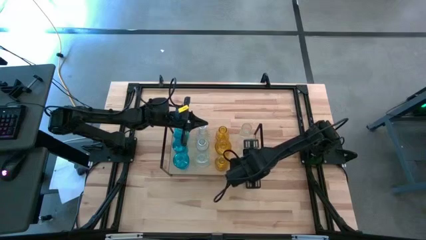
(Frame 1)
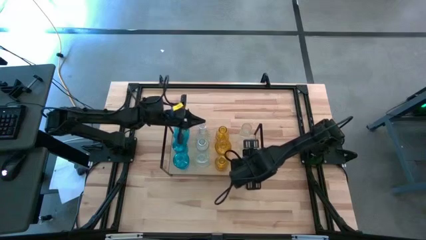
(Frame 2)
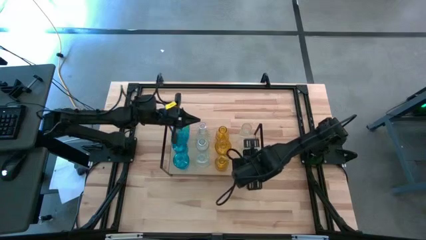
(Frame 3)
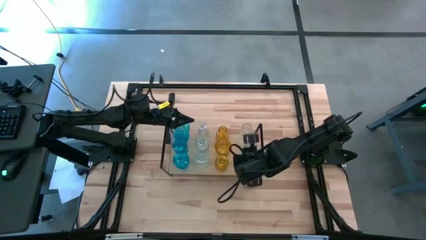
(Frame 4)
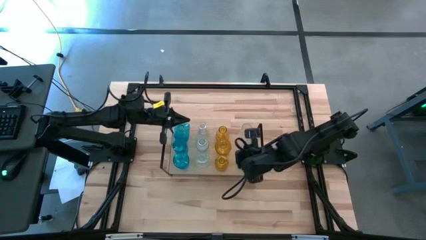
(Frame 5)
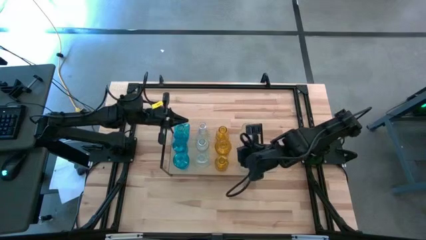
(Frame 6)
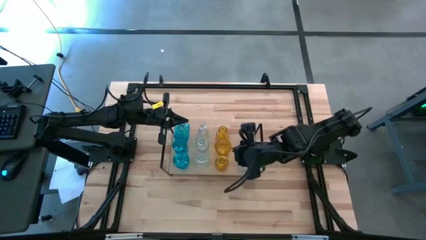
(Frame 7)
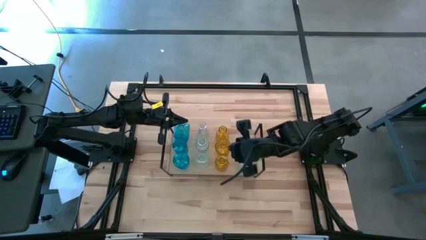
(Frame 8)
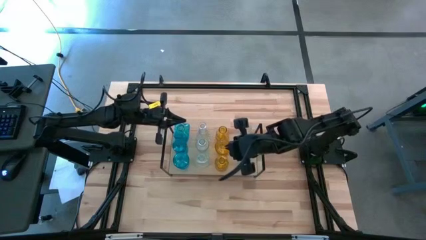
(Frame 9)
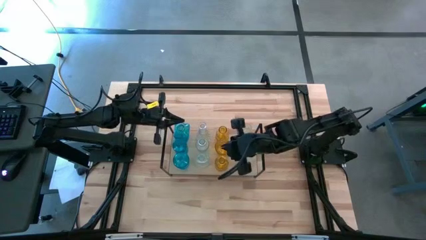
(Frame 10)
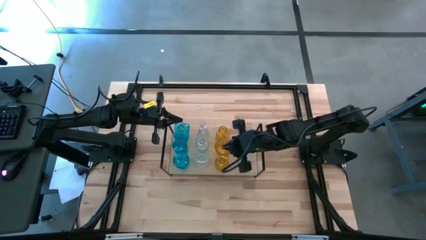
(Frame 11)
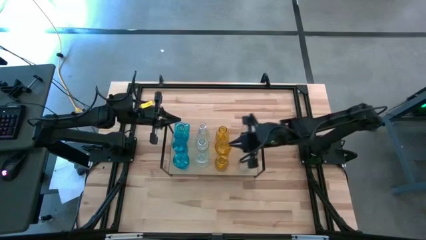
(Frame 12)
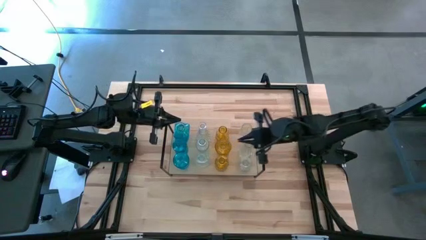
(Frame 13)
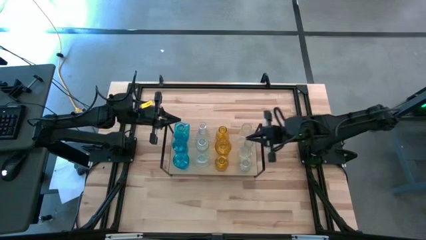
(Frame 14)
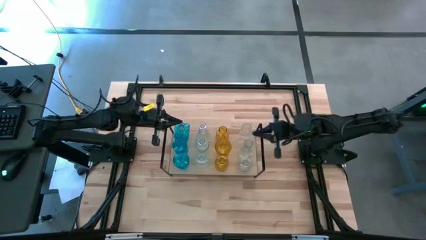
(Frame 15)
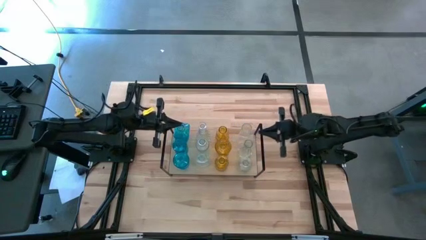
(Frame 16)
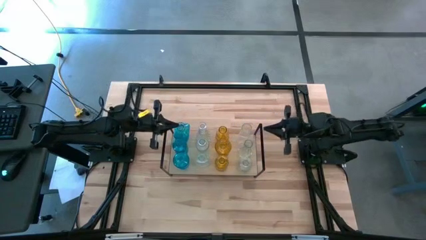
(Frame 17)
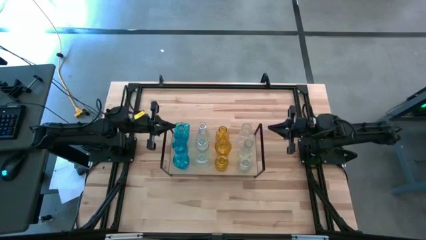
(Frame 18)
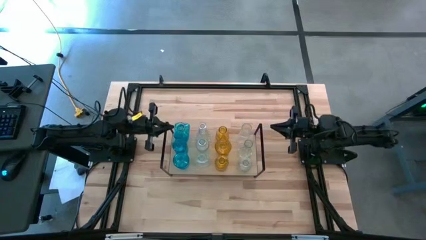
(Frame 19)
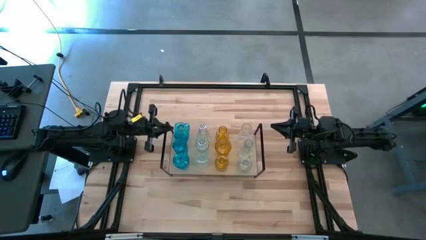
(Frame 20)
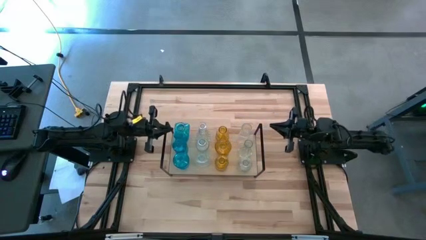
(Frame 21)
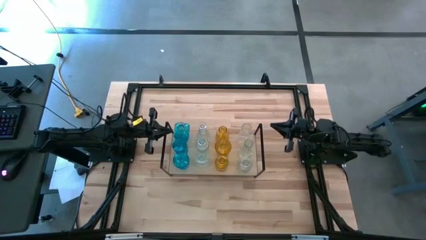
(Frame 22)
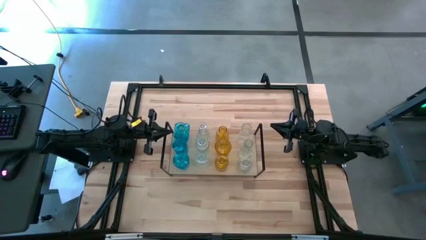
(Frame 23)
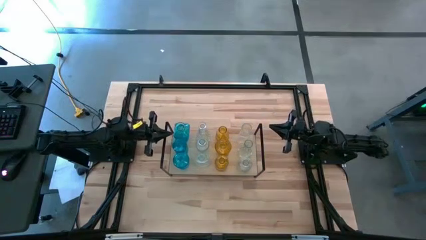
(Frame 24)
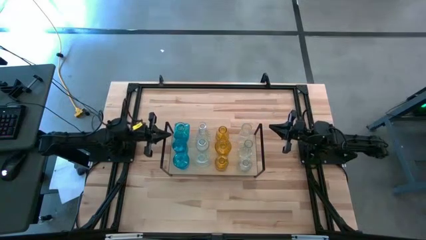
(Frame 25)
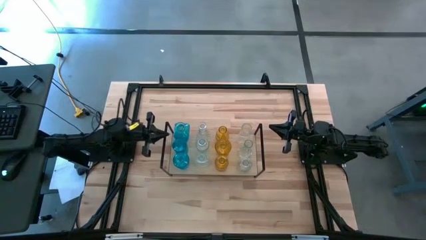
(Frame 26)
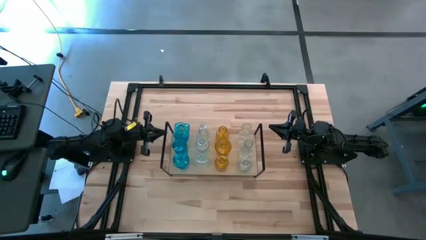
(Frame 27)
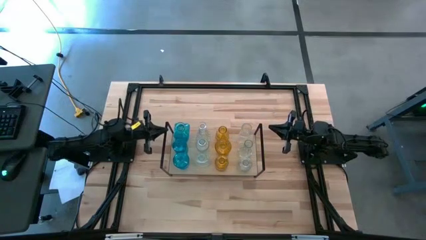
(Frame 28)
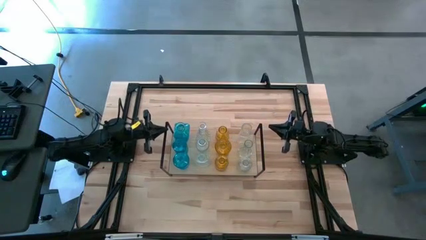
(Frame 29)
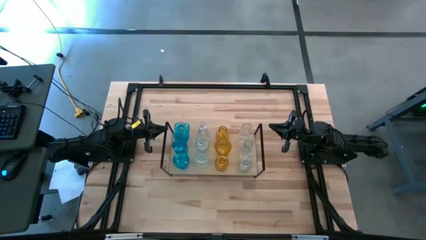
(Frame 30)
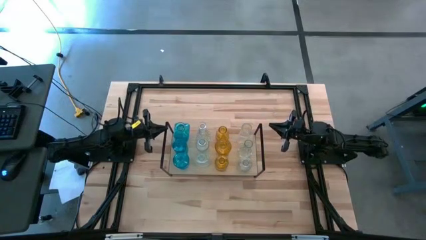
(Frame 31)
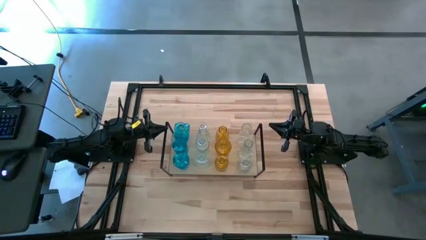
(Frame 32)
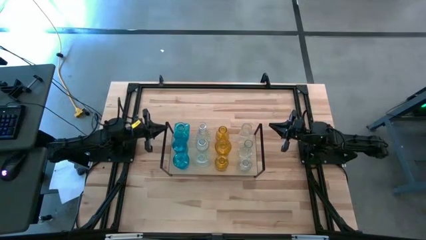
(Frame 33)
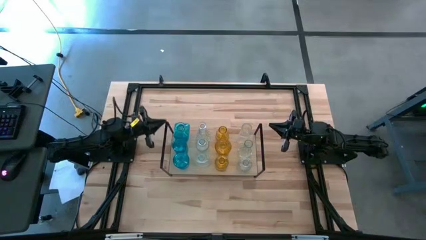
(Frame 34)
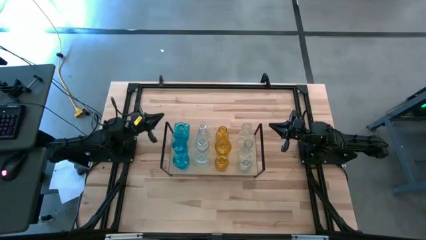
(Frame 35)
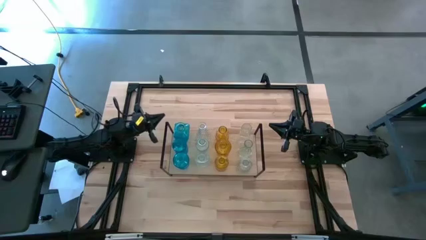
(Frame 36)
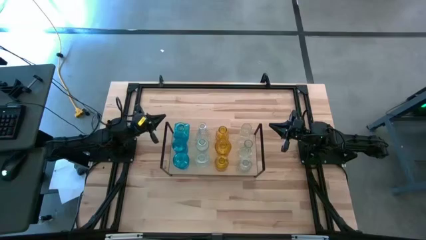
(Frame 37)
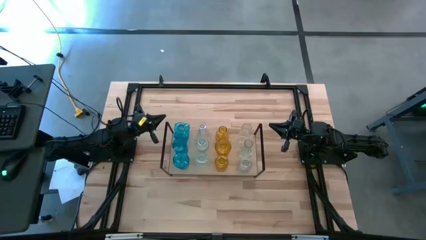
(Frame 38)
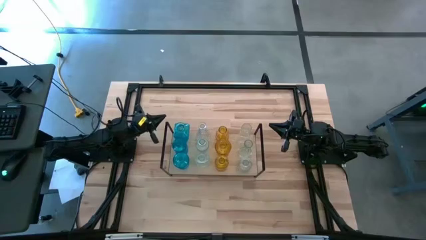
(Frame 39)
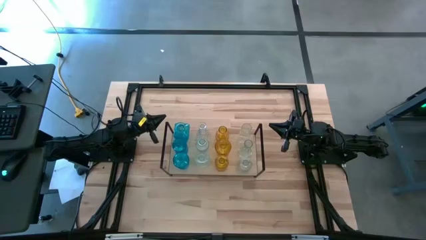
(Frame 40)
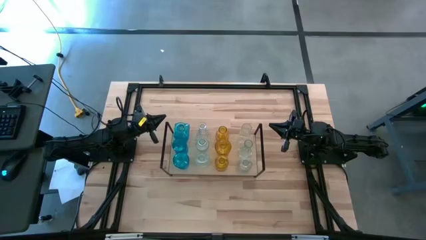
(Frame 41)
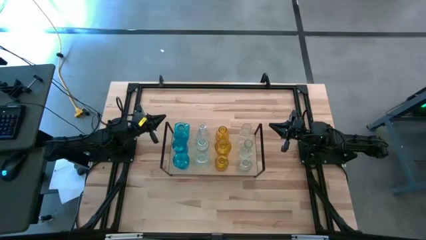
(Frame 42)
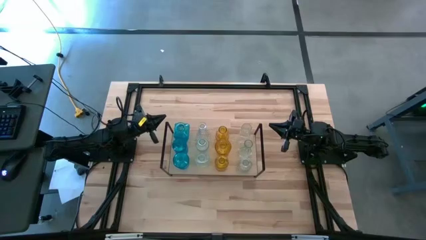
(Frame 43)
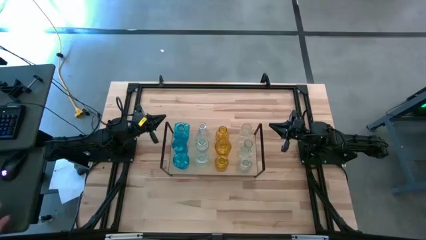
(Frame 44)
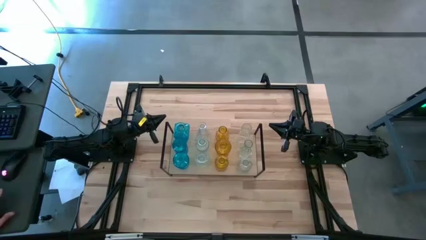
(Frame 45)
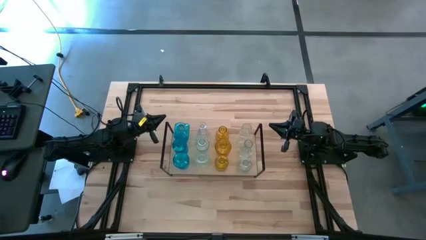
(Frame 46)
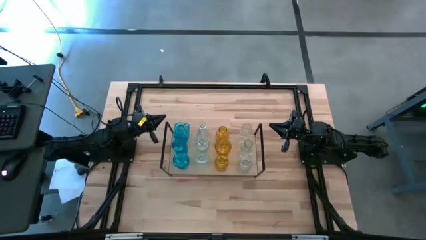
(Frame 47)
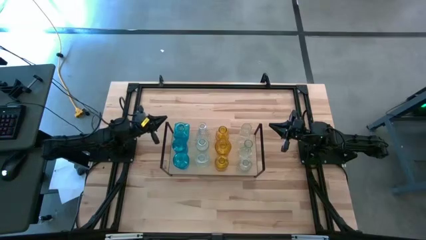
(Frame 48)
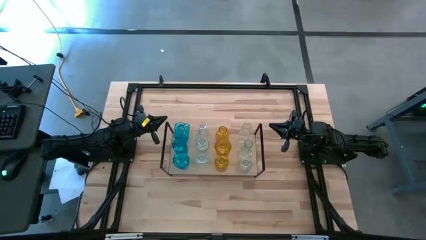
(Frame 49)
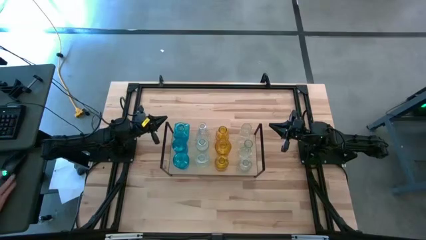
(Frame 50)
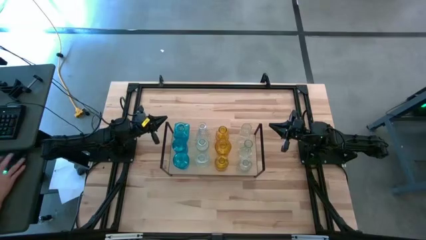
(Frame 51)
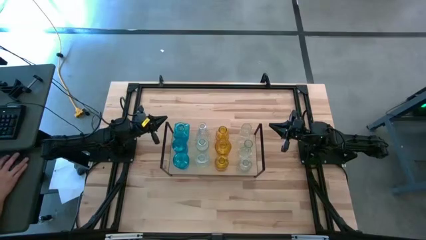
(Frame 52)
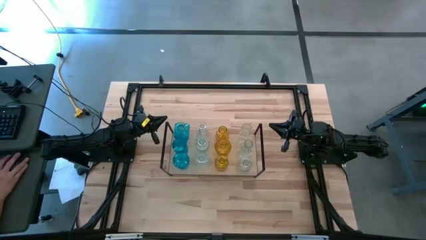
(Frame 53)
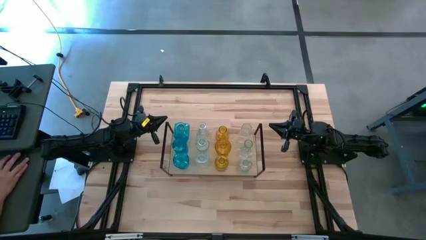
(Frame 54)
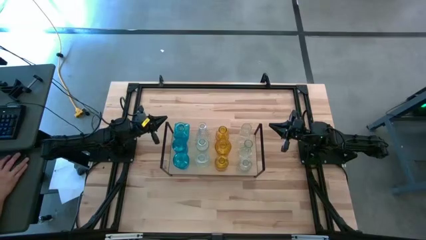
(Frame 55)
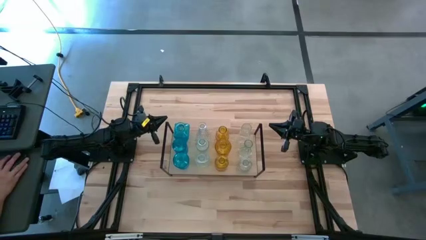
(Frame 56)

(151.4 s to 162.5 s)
Task: sort vases onto shelf
Return to Home Position

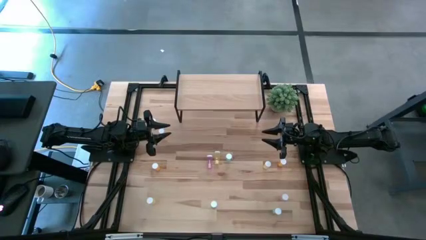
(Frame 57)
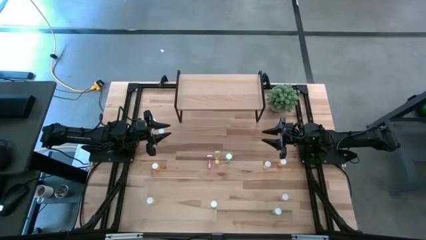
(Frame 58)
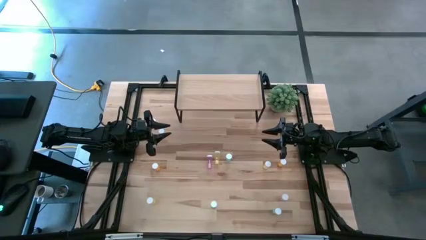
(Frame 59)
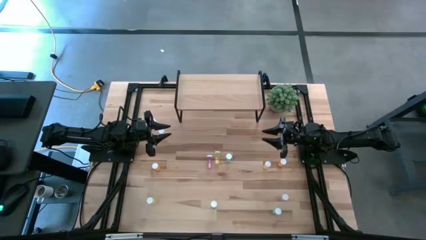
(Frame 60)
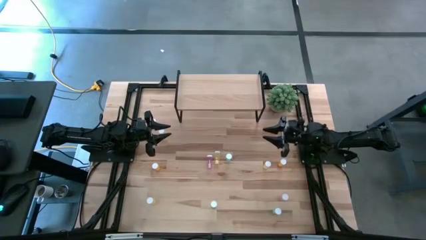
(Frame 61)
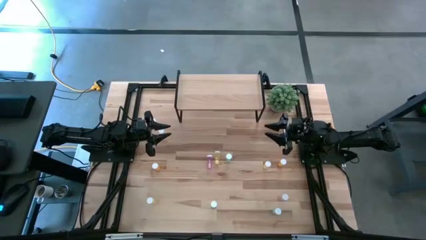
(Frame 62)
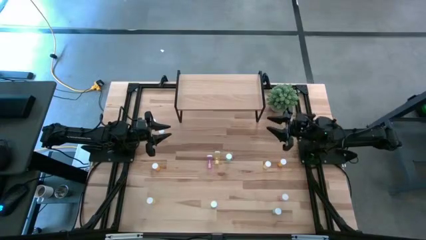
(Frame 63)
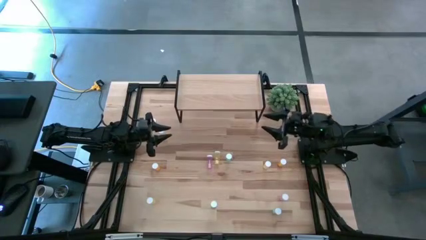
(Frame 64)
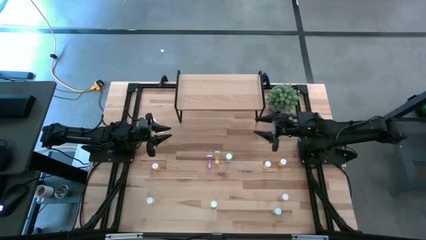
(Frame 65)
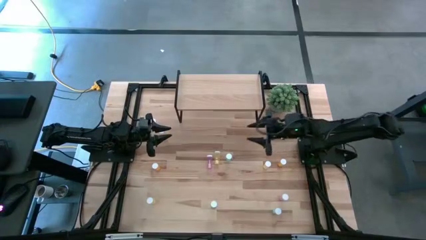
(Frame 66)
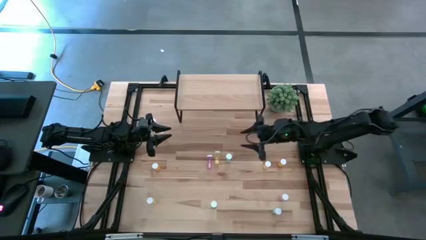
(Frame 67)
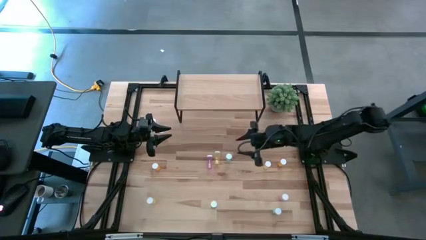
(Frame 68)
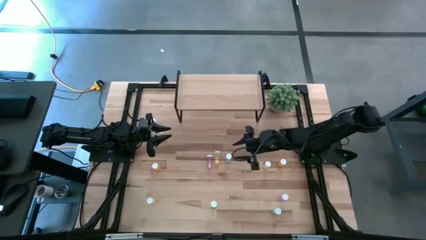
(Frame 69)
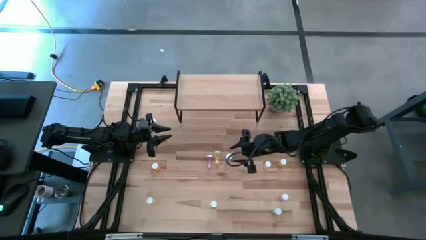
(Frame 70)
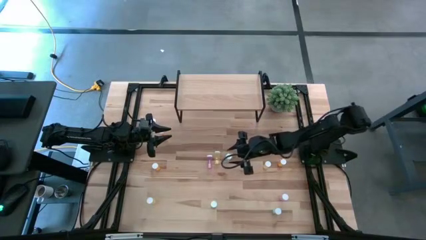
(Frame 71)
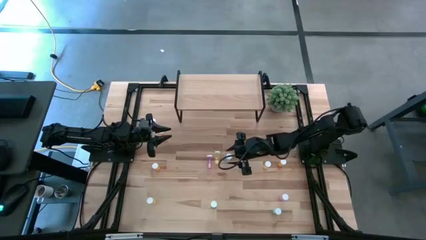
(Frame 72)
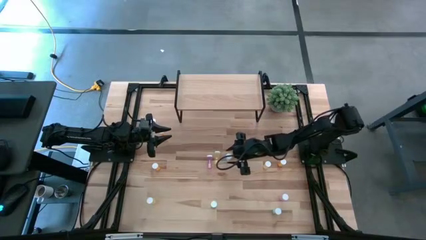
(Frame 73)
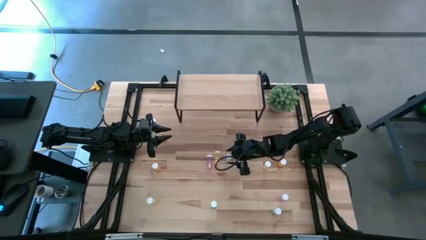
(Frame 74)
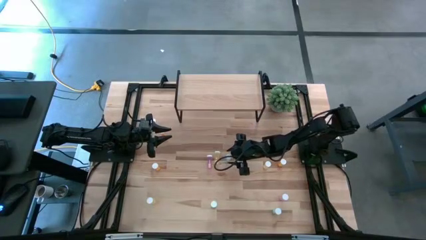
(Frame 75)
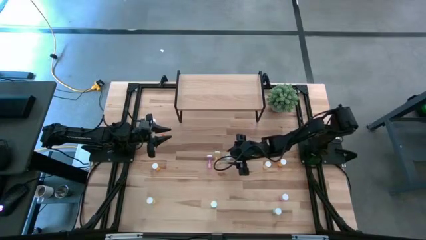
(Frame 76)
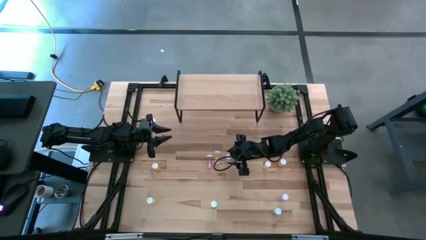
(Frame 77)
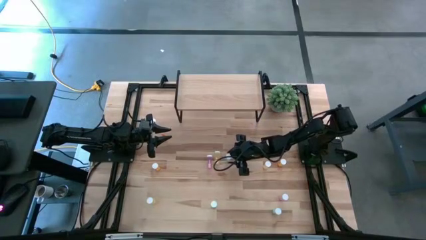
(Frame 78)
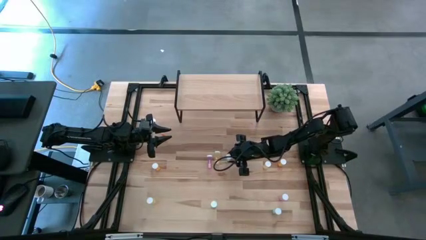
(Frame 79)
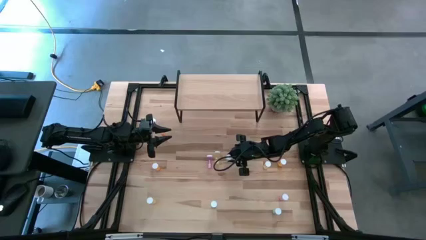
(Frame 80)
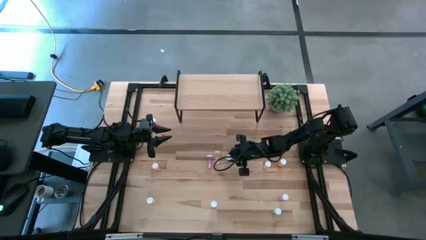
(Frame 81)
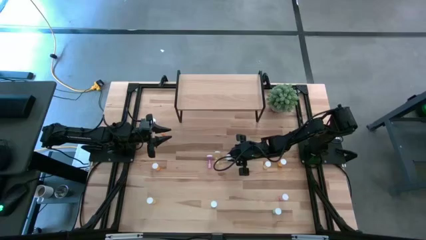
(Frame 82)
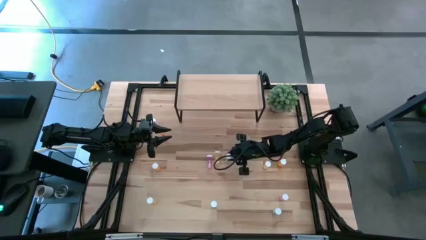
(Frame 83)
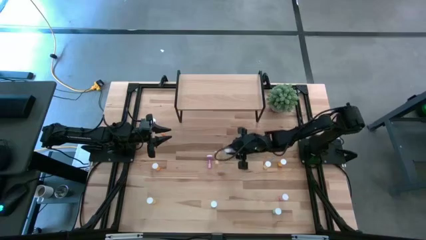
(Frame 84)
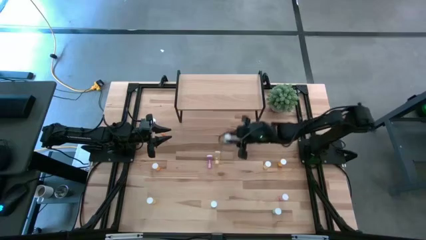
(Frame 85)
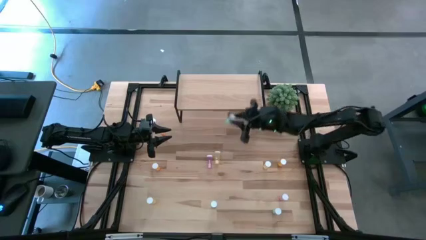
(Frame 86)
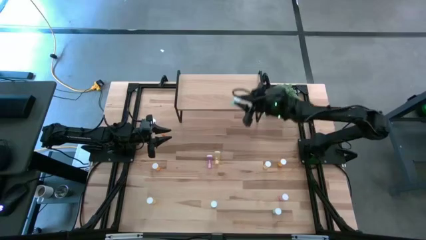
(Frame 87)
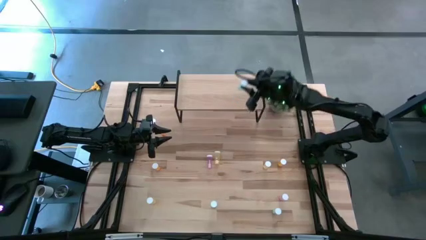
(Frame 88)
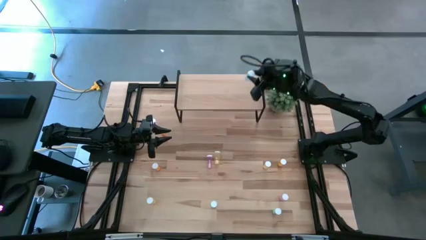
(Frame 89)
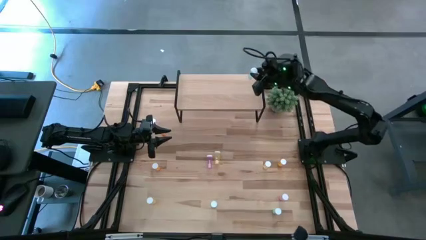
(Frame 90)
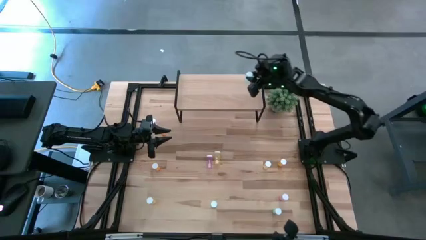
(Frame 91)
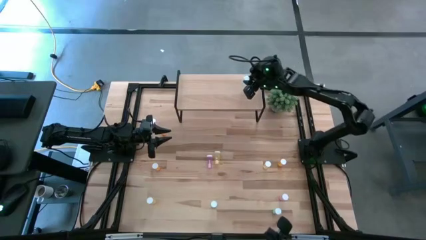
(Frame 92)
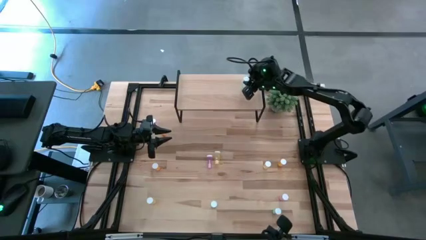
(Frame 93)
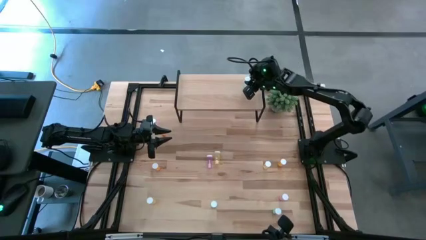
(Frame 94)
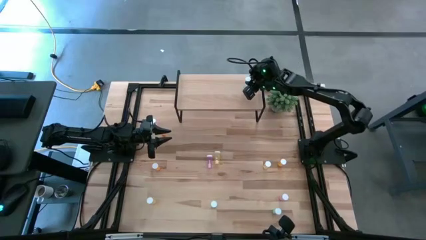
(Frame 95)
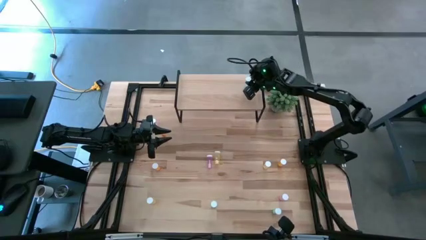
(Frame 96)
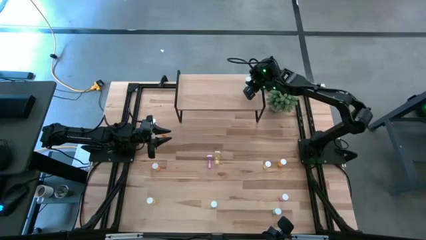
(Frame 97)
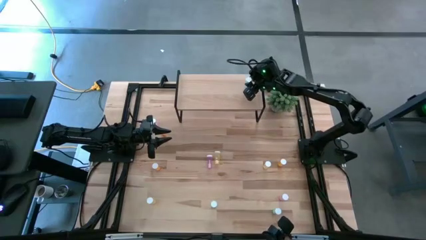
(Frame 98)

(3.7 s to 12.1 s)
Task: Pick and place medicine bottles onto shelf by color
Put the top green pill bottle on the shelf
